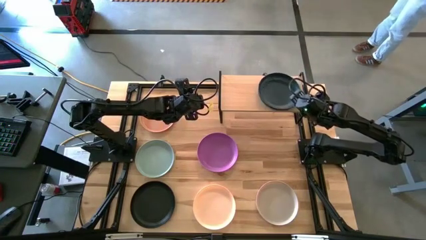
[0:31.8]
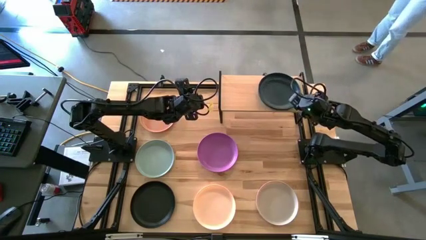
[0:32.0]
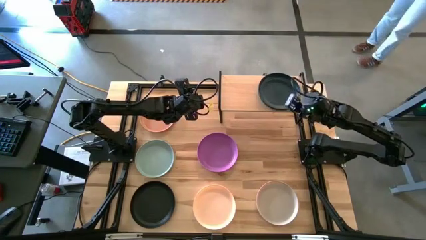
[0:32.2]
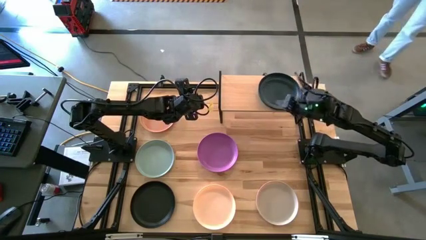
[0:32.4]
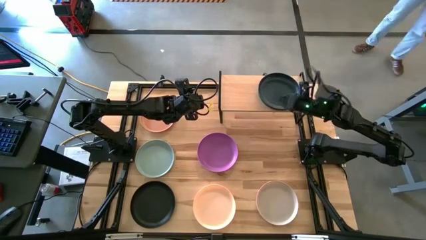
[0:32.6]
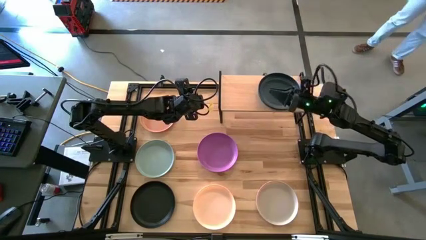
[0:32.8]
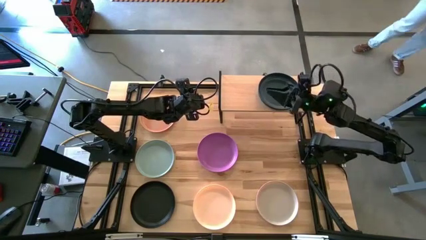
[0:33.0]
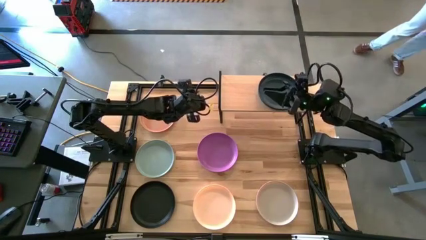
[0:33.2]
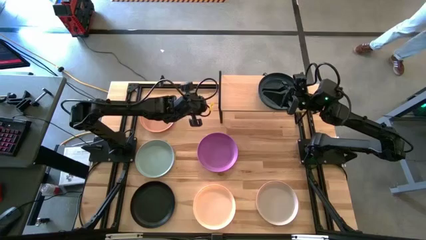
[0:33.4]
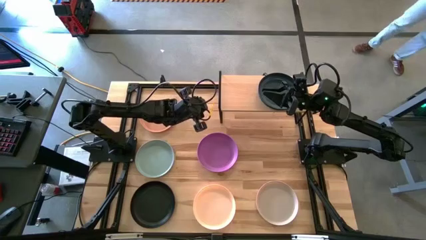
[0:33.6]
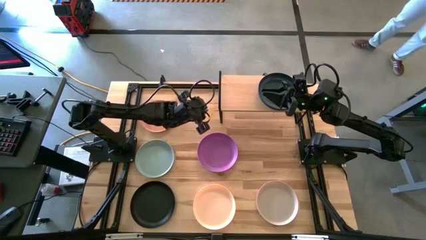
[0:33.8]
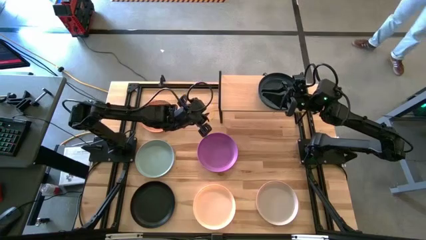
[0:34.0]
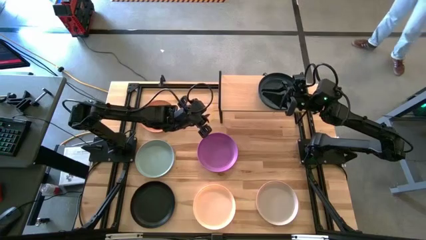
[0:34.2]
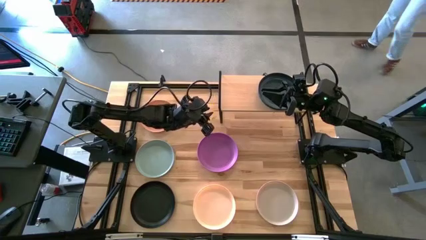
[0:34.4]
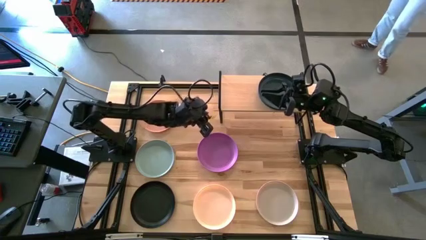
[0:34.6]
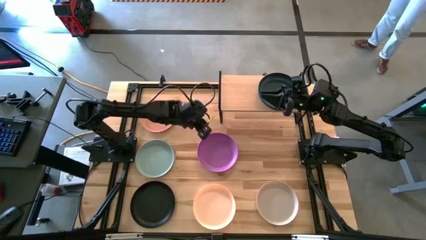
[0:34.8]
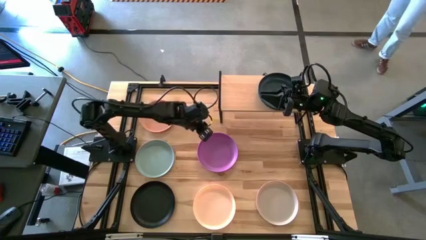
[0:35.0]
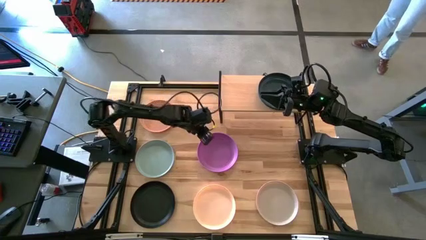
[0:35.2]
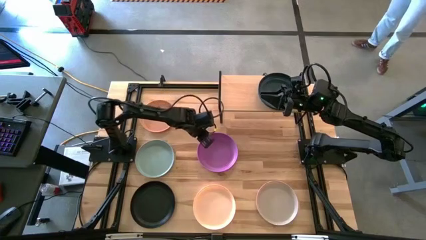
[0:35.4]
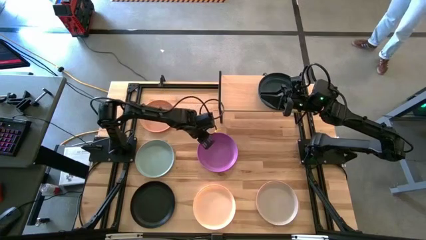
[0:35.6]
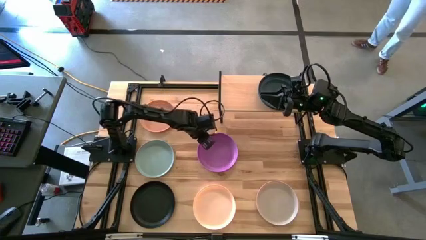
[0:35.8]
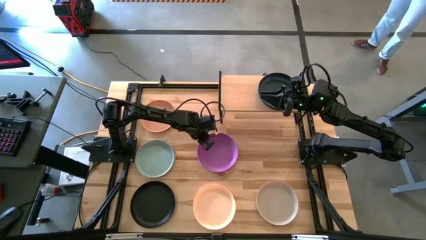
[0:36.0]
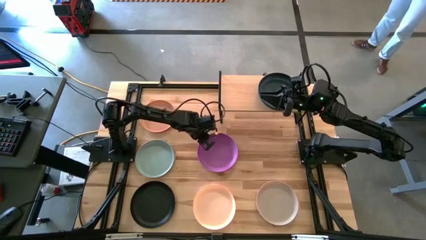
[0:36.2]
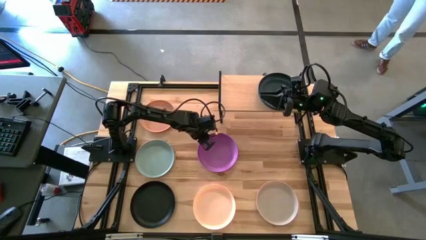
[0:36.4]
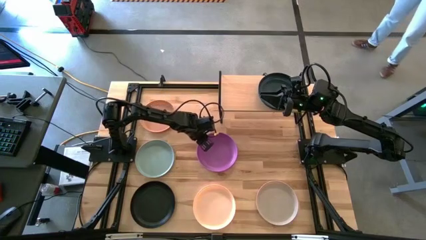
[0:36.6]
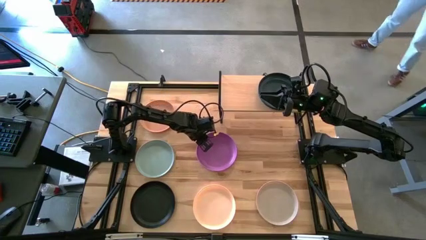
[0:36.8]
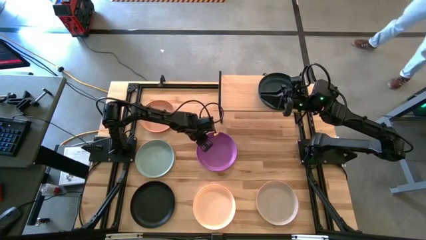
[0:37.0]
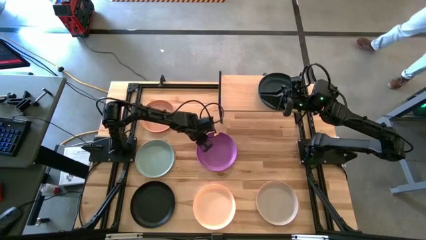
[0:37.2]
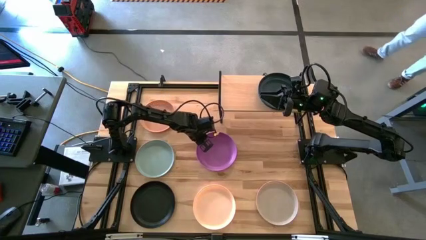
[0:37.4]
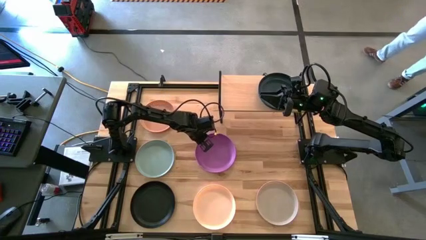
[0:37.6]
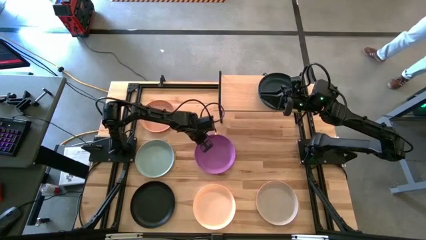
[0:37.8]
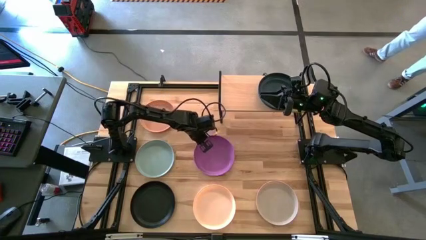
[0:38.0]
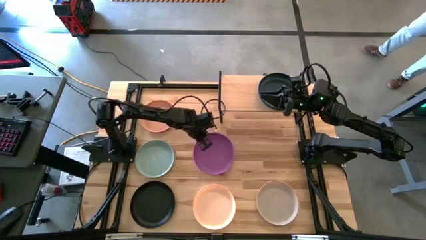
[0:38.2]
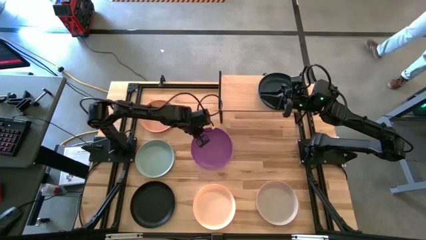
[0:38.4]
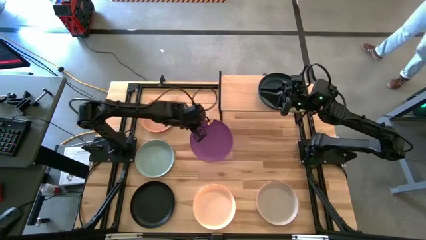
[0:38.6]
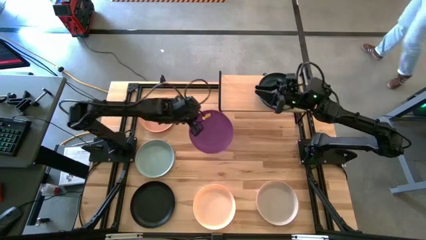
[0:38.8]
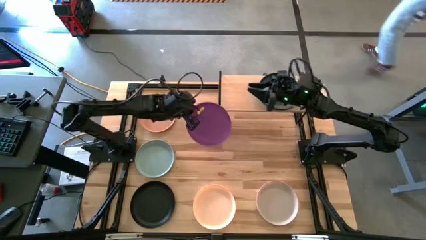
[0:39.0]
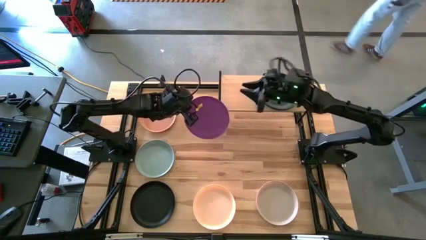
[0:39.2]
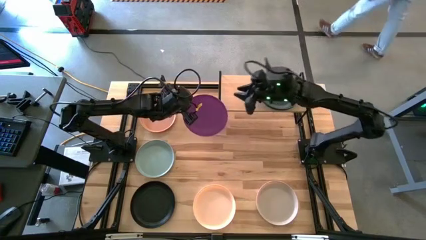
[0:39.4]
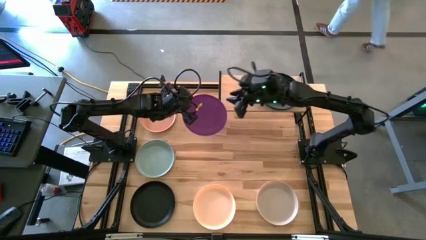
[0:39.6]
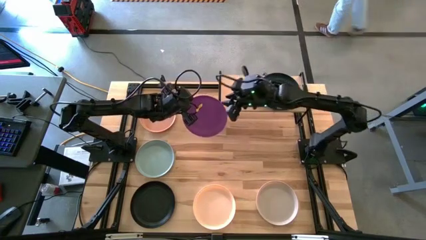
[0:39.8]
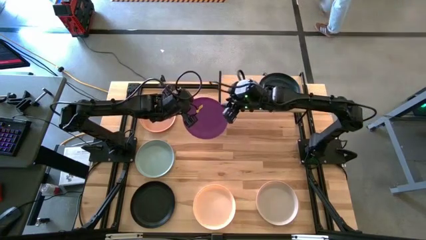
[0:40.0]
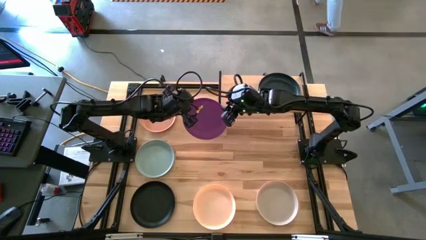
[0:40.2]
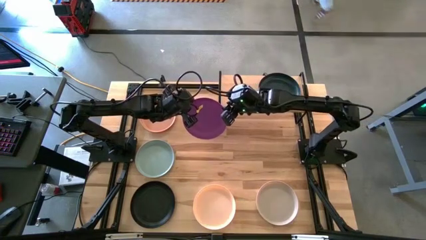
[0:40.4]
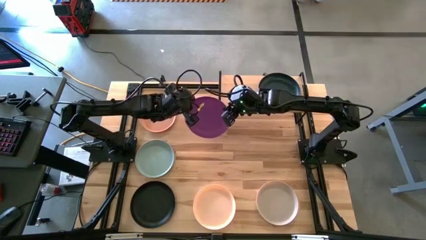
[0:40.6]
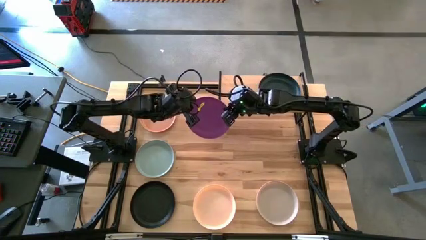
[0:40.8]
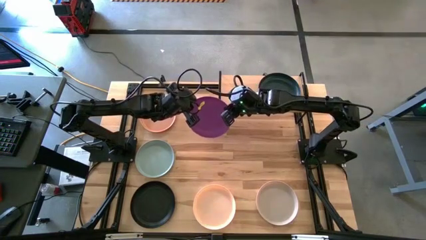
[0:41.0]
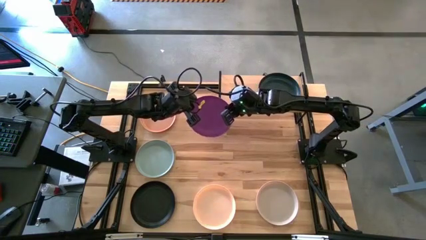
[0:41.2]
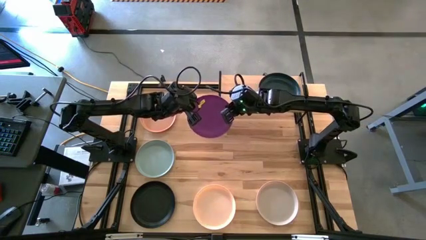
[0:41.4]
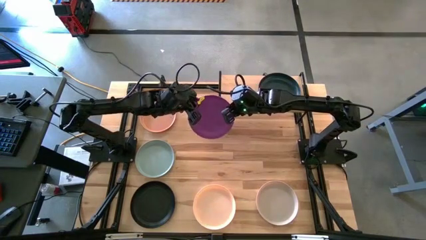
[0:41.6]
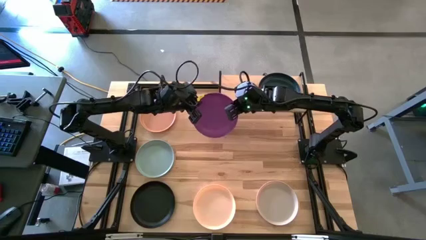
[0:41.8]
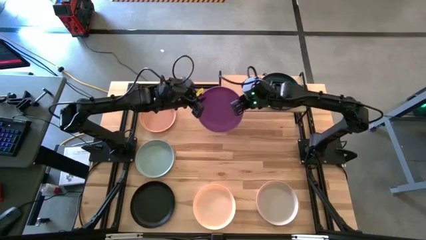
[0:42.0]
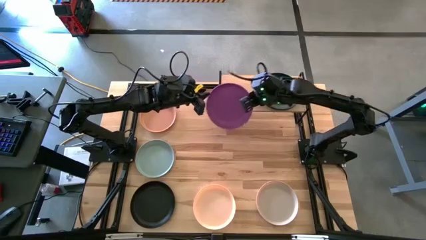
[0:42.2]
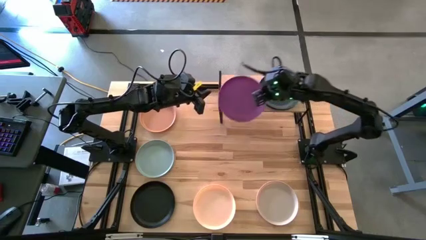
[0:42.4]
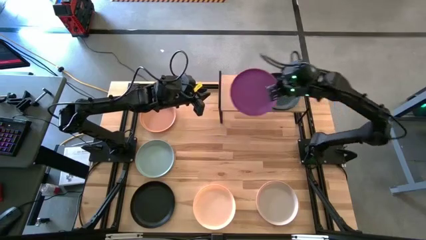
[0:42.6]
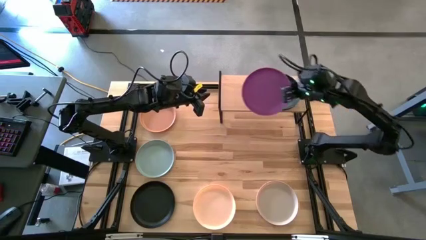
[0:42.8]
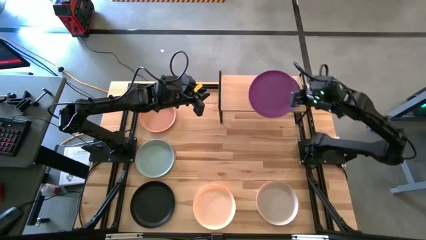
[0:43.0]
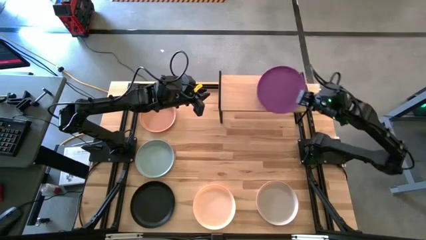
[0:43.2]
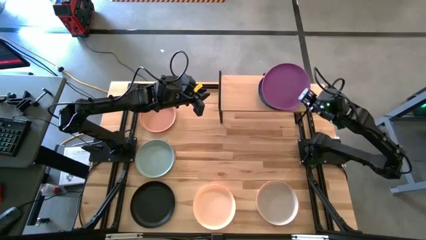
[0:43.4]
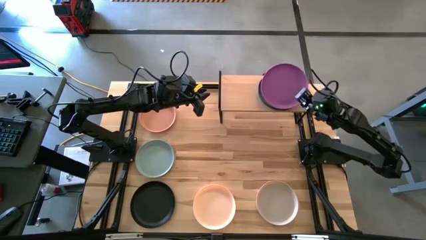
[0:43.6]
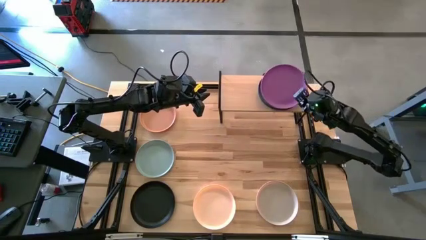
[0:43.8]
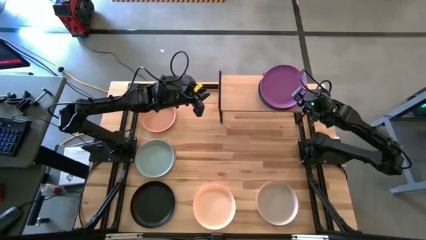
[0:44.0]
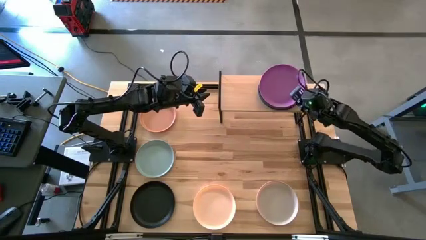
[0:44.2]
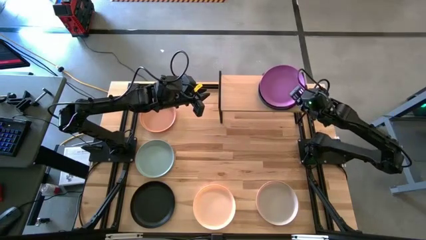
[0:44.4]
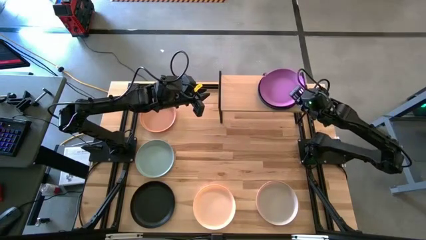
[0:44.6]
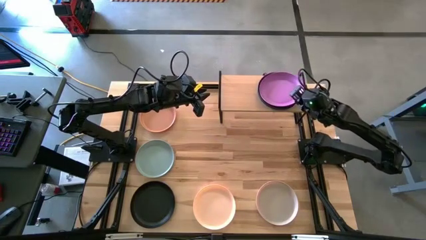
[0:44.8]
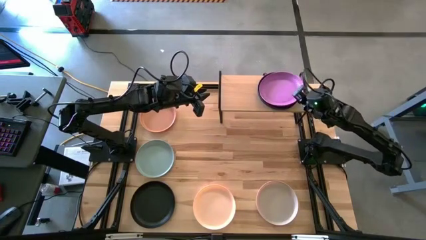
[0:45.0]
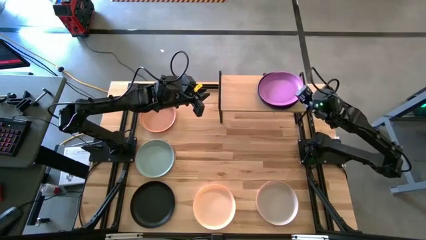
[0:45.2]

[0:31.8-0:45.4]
Task: Place and stack plates onto a shelf
Stack the purple plate on top of the black plate on the shelf
